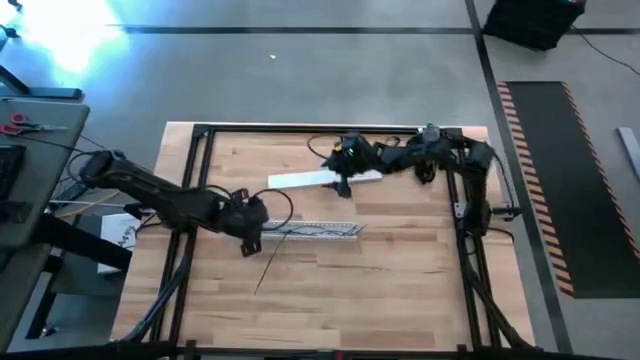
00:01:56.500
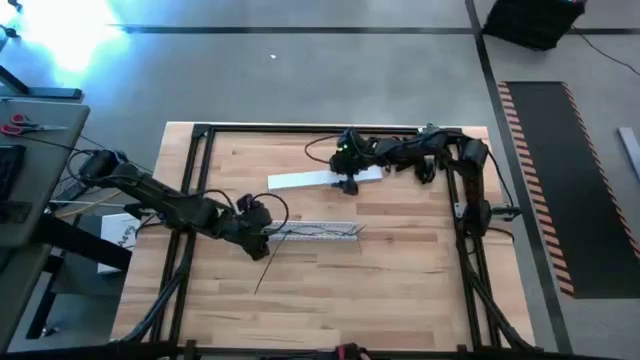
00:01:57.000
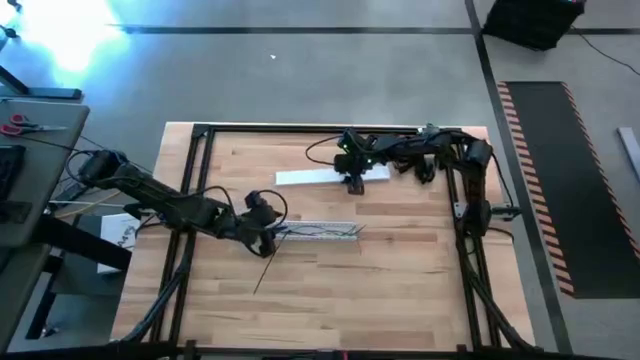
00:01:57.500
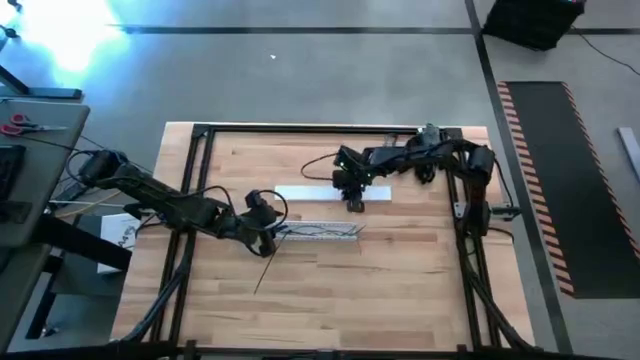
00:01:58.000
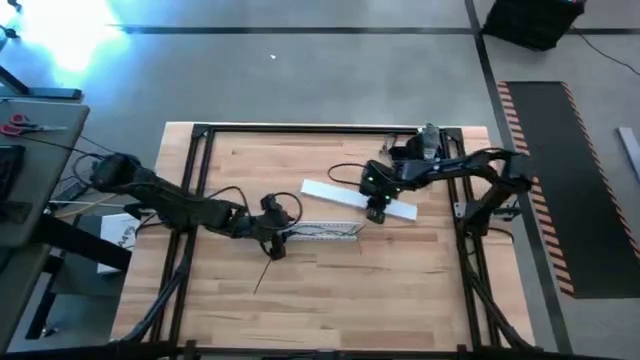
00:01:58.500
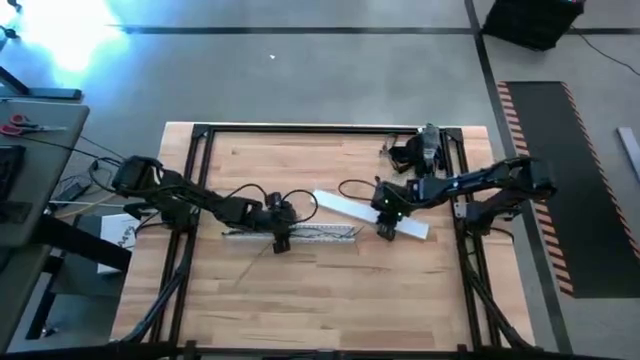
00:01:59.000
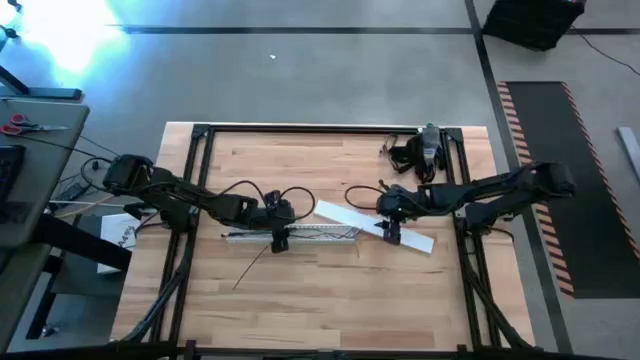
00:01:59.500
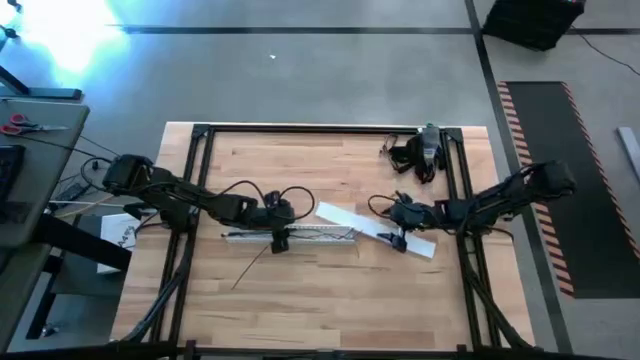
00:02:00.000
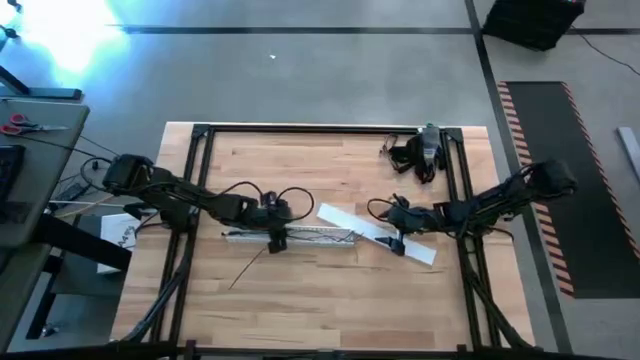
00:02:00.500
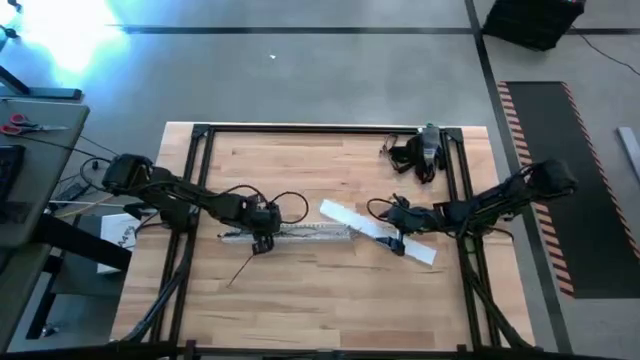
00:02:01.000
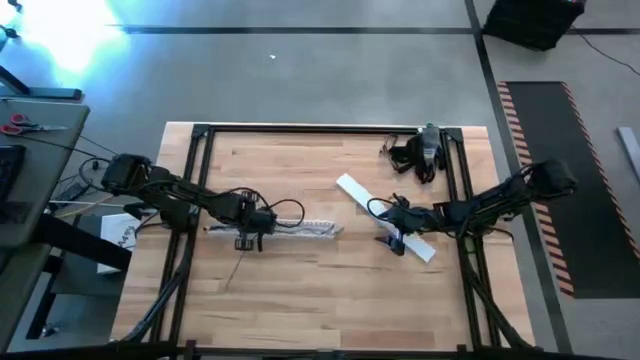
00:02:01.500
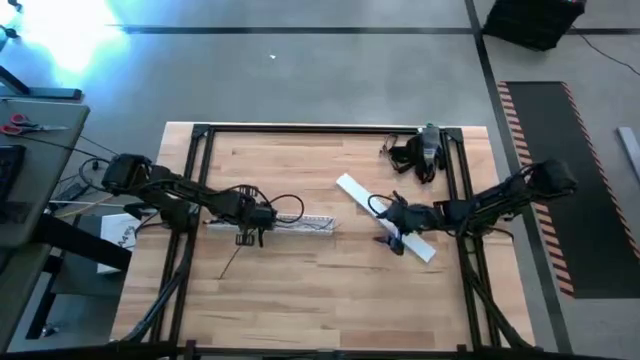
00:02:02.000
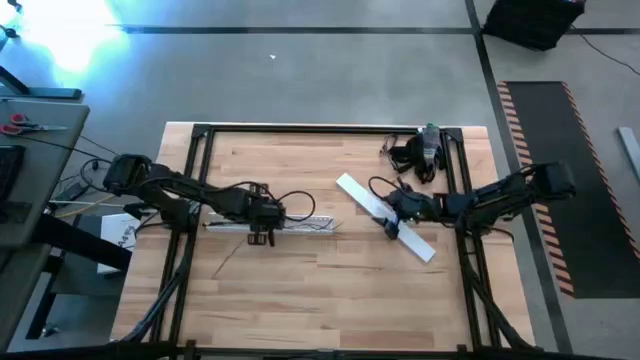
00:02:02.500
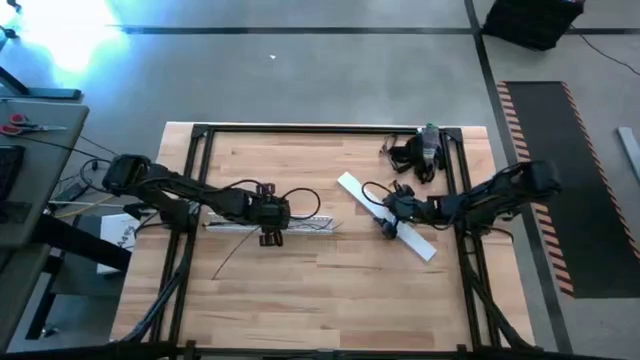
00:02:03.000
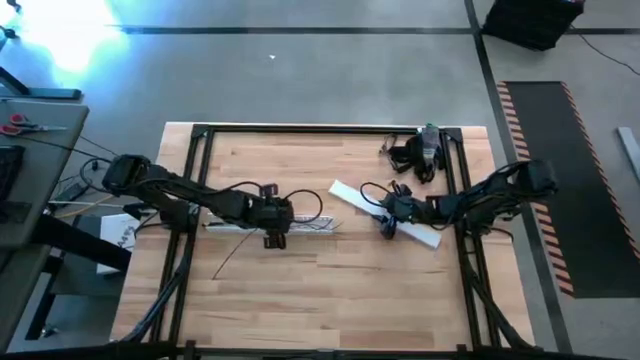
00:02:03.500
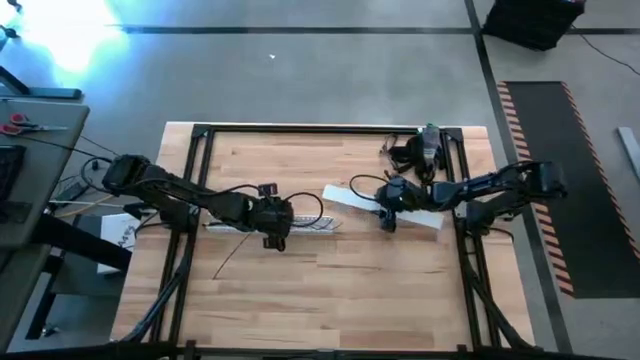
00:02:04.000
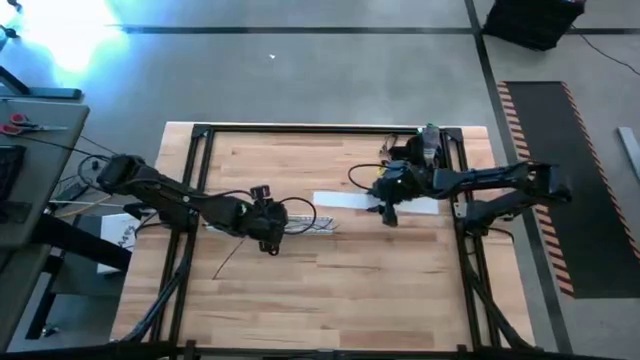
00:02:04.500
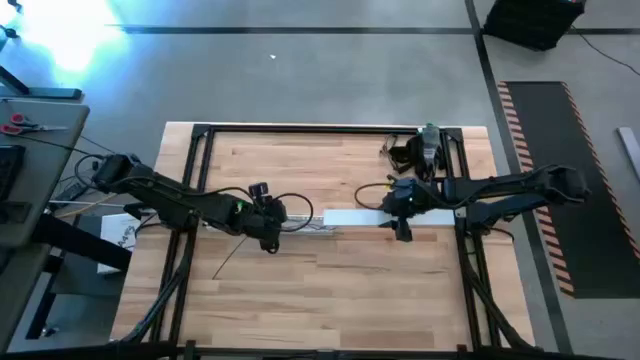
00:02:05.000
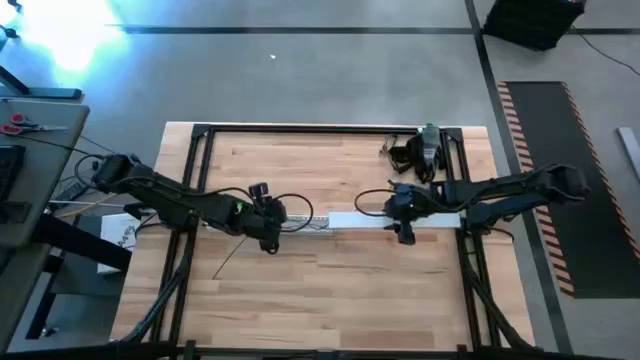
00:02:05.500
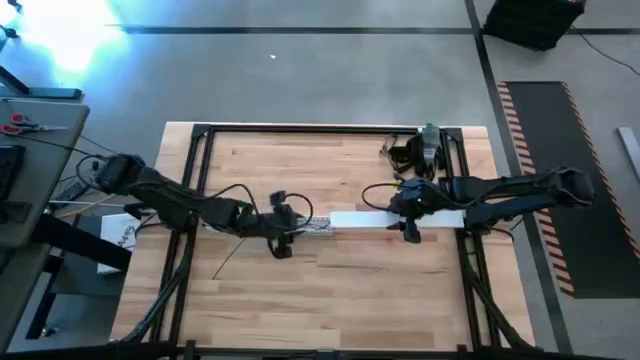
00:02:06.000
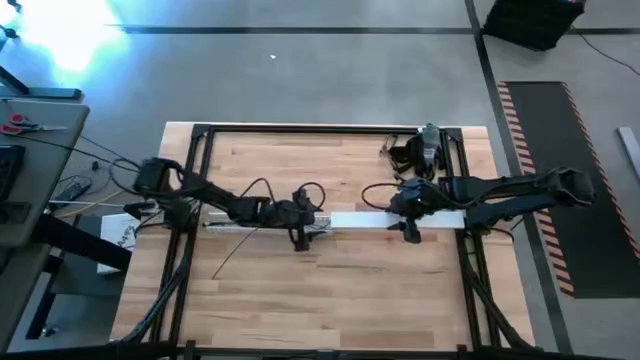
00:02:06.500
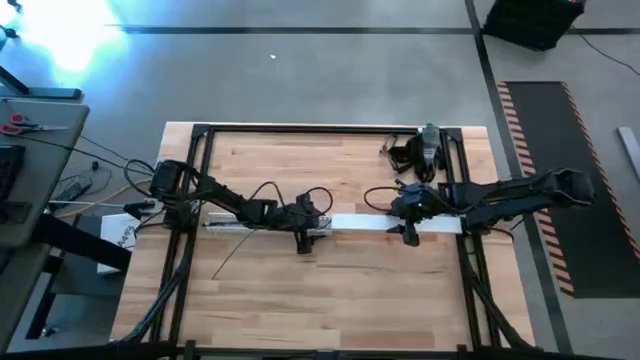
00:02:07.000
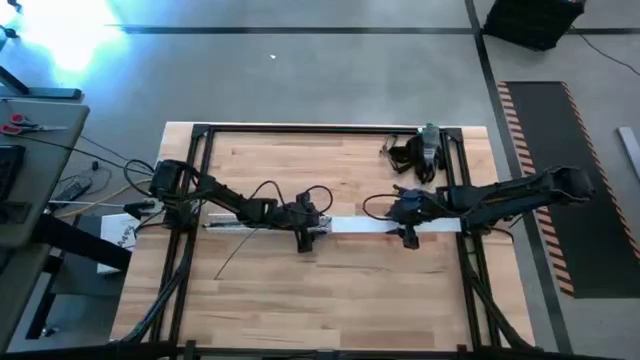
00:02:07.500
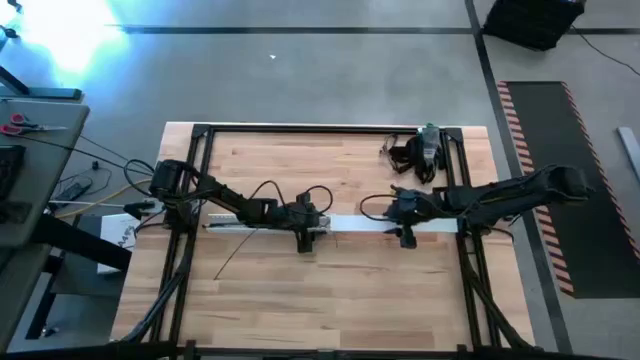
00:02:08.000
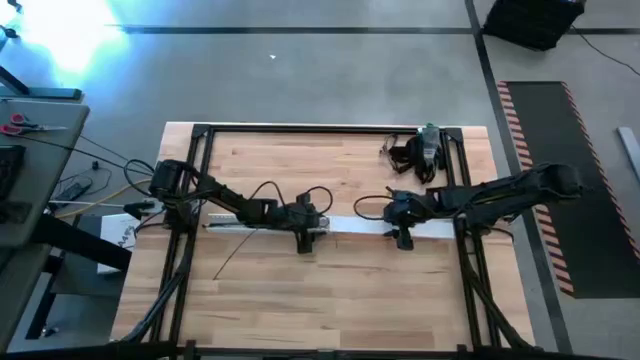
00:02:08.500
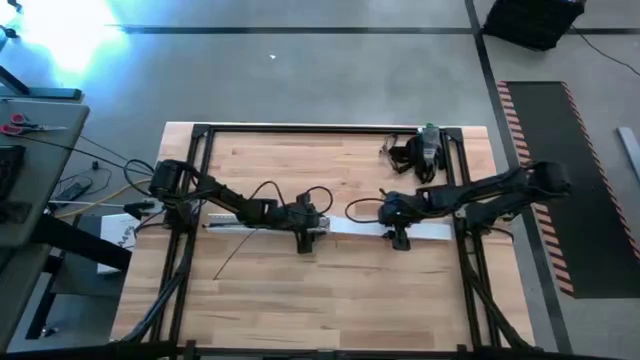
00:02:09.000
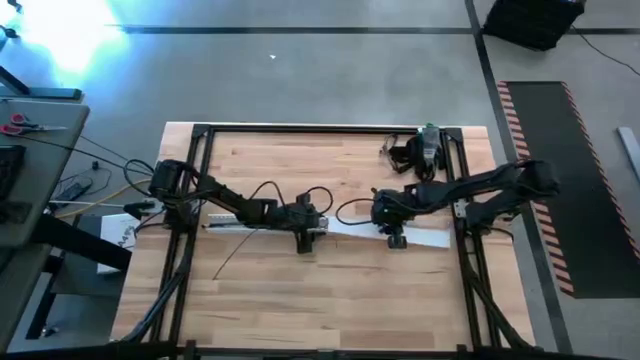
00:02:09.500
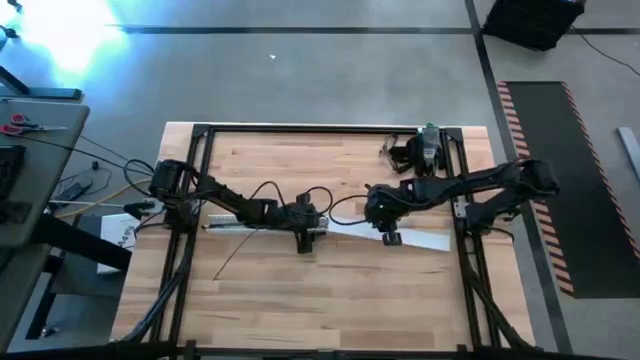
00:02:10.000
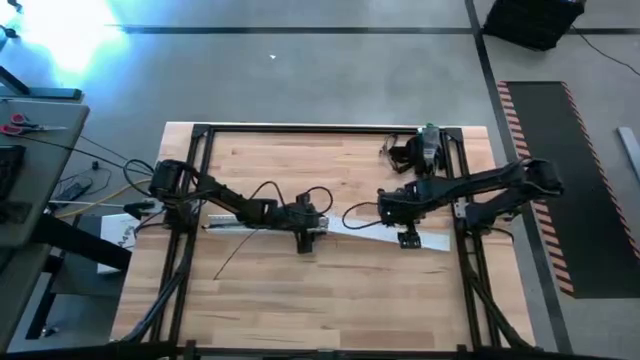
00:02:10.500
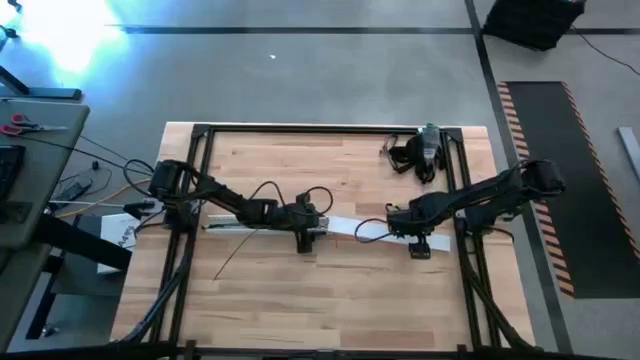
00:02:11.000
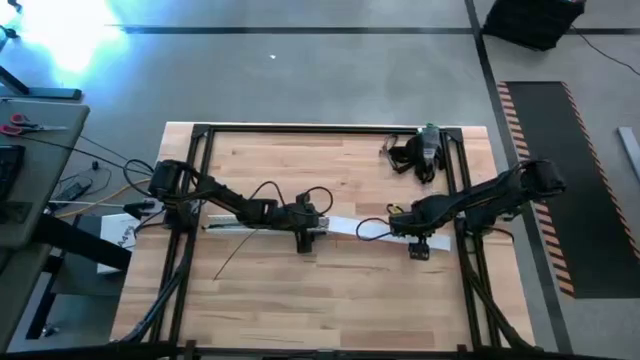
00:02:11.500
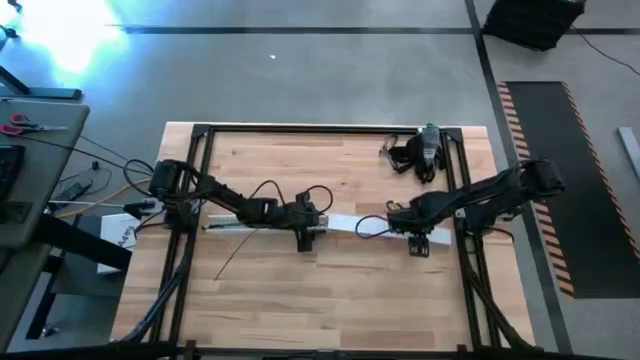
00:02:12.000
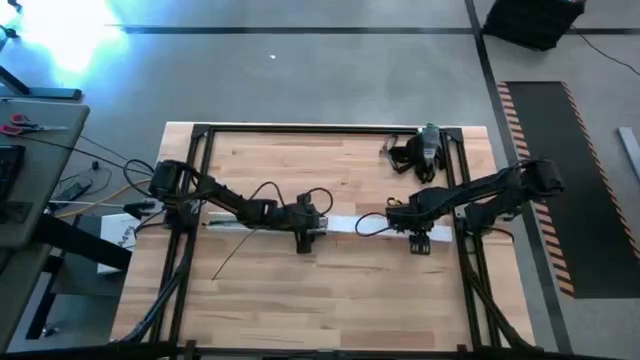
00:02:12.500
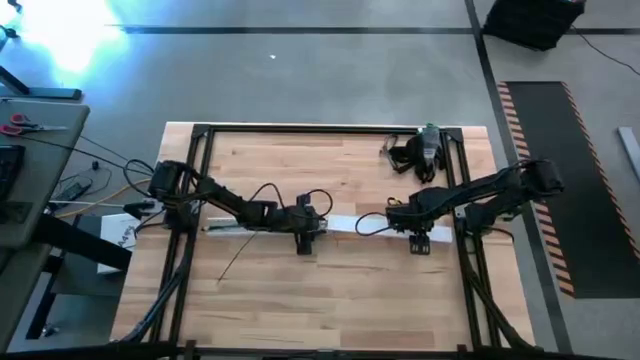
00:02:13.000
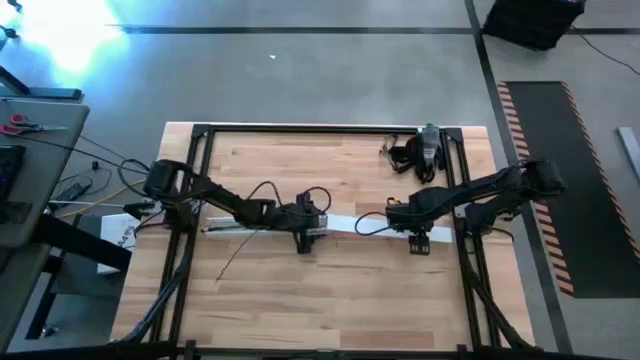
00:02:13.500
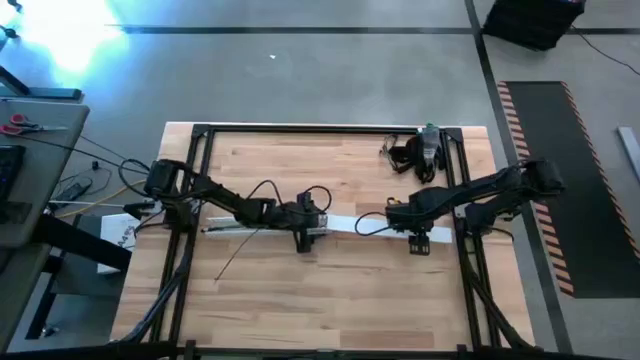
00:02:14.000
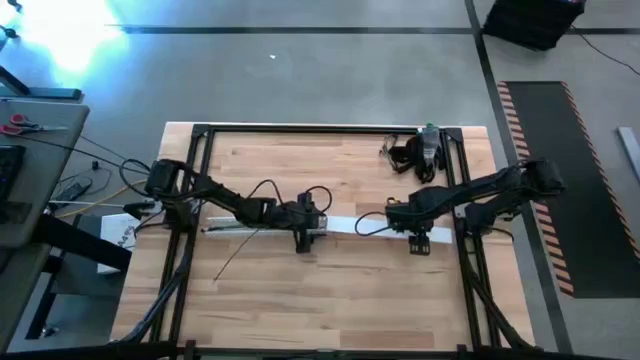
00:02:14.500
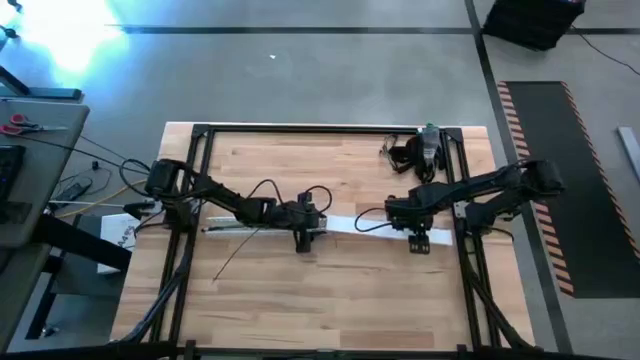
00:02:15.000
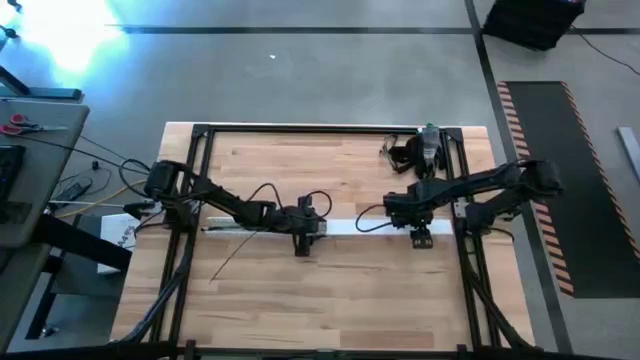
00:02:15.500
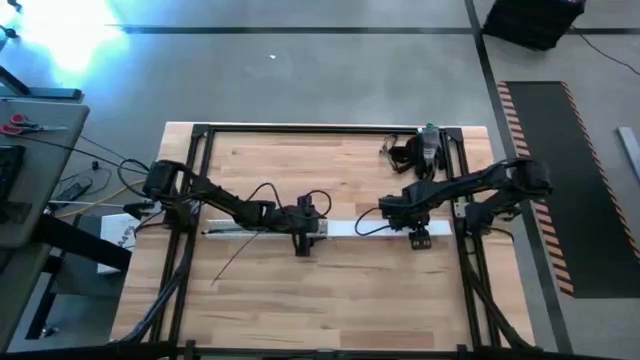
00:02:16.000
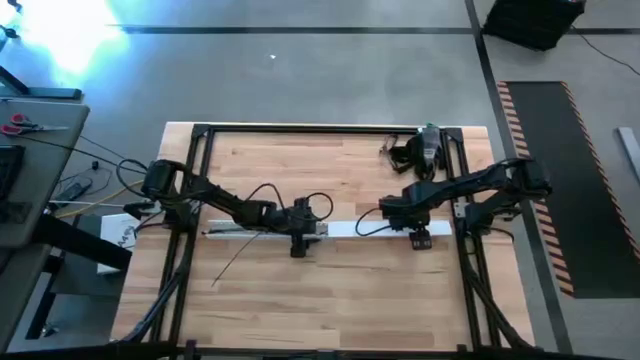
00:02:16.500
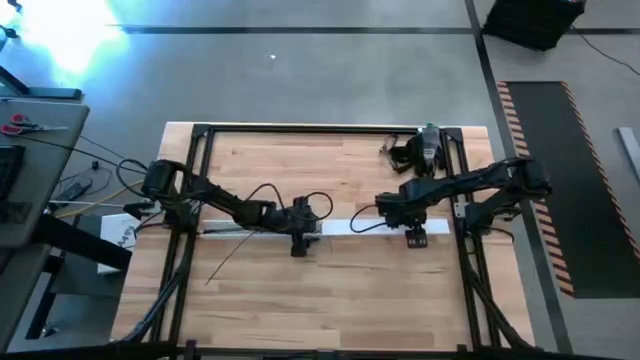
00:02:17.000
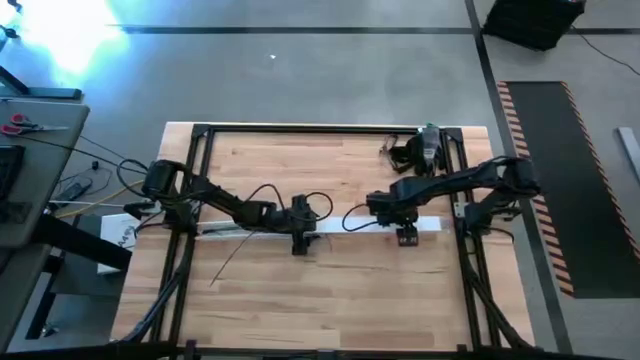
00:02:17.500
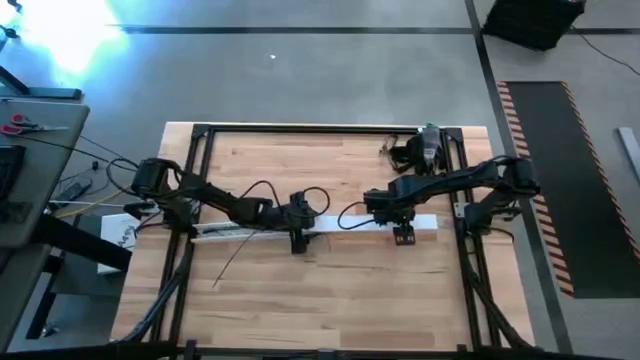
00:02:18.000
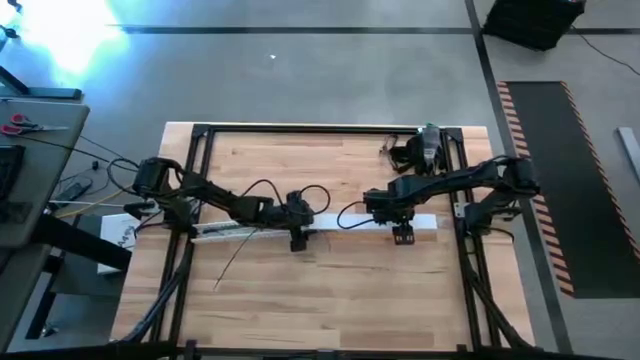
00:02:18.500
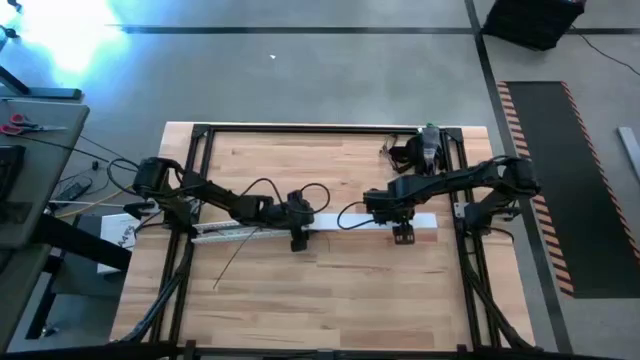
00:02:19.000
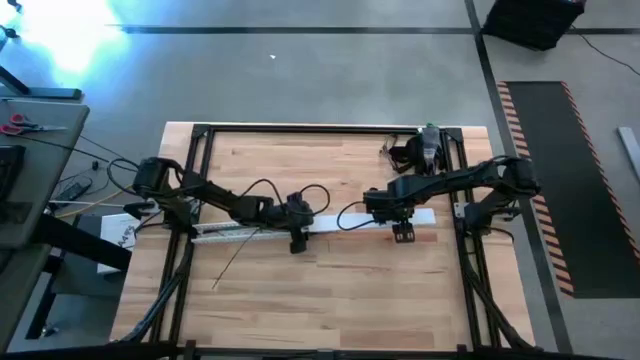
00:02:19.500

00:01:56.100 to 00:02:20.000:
Task: Ziptie cables
Close the white cable duct
